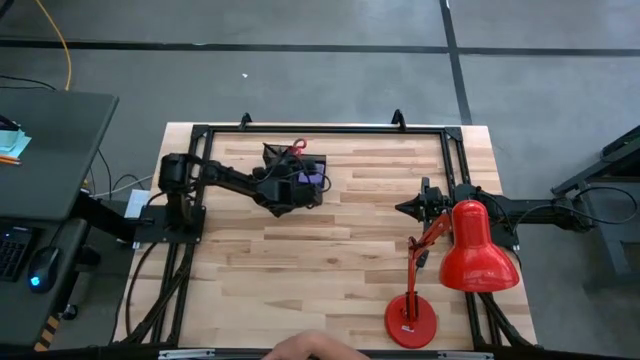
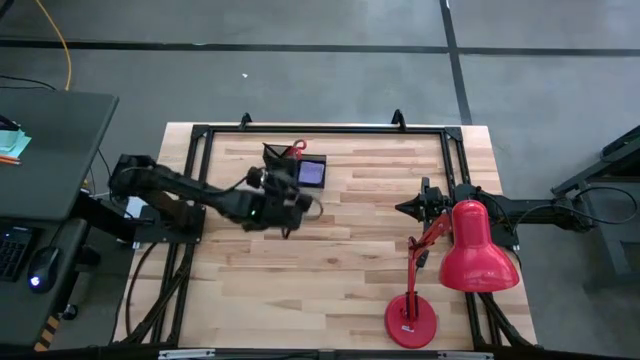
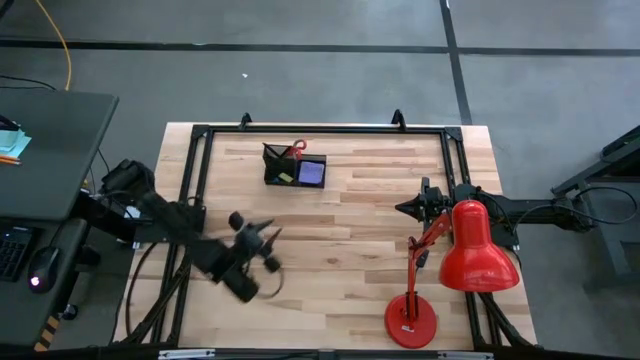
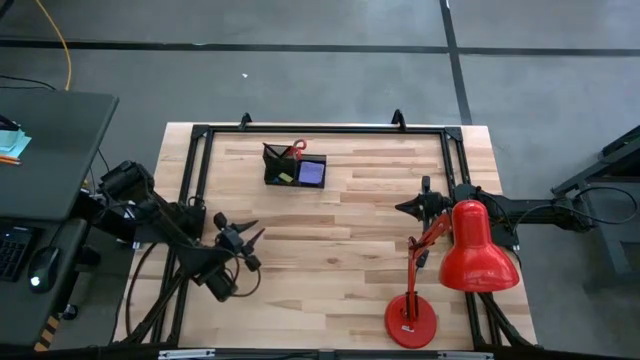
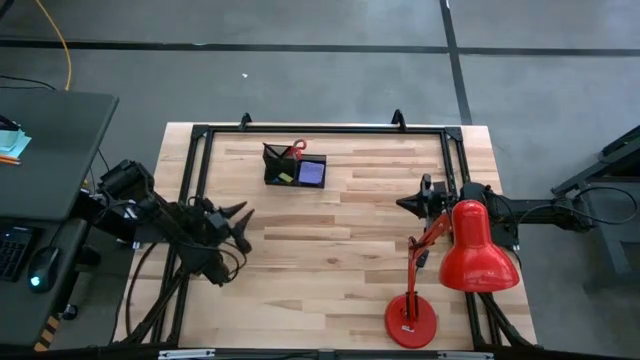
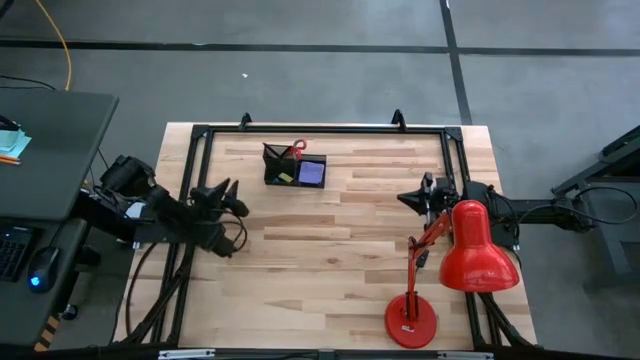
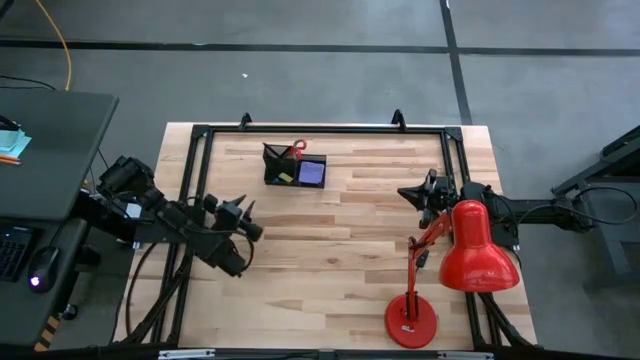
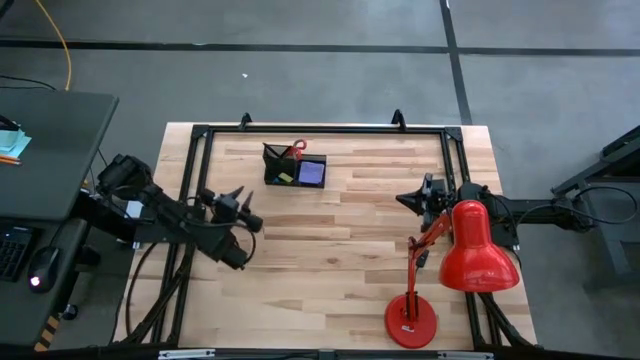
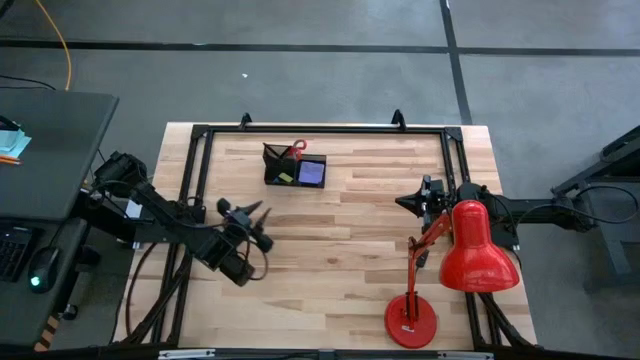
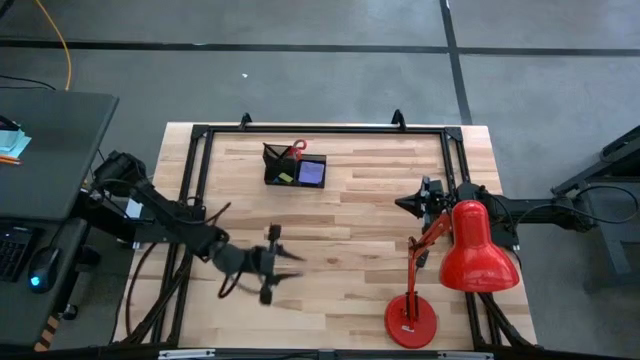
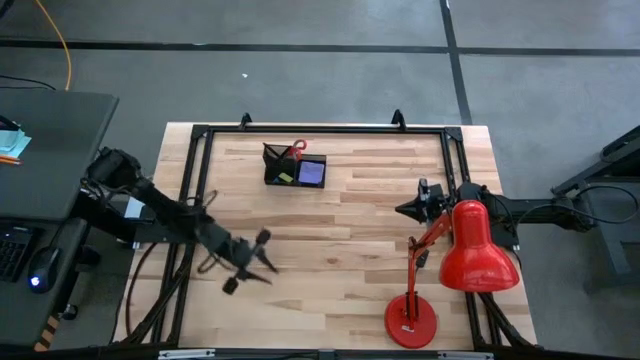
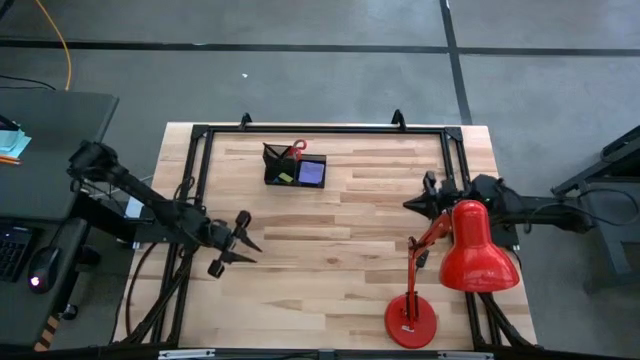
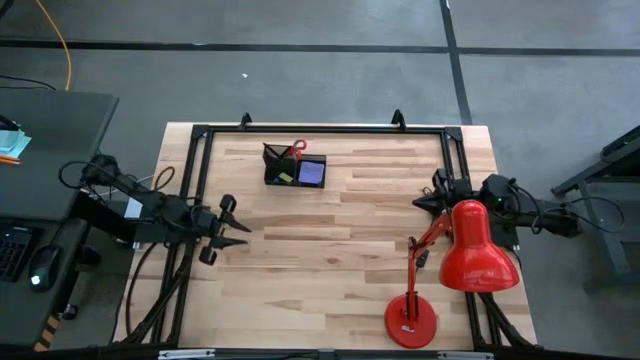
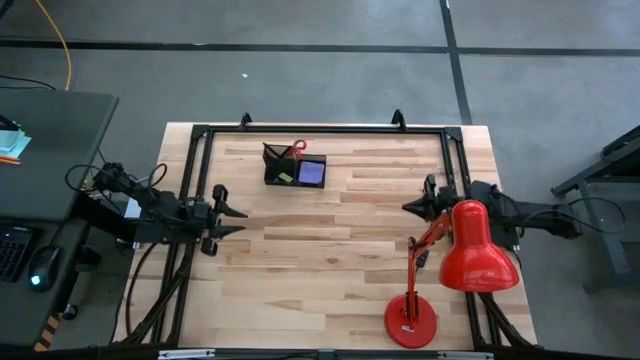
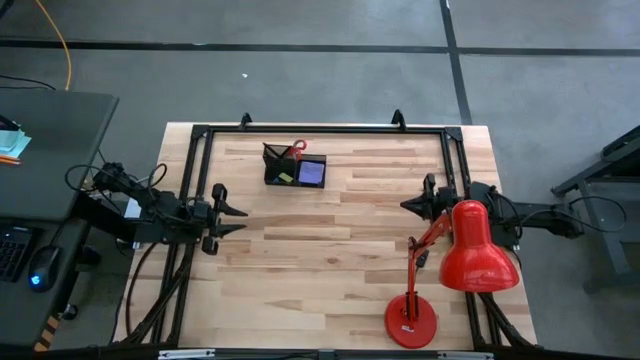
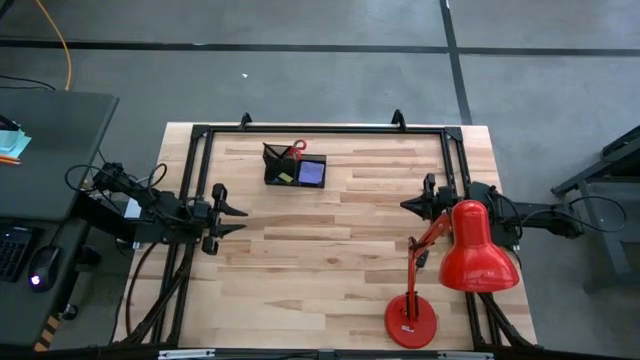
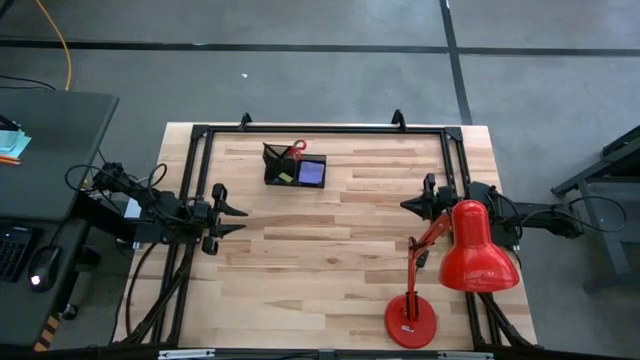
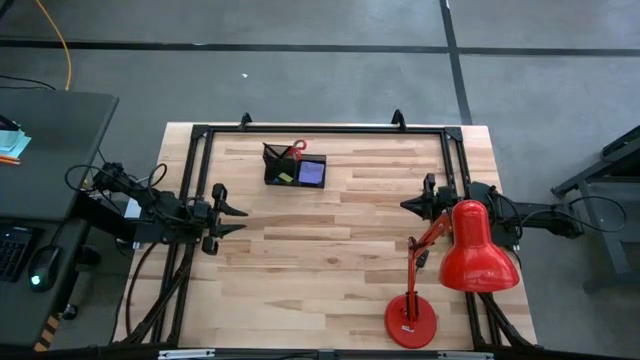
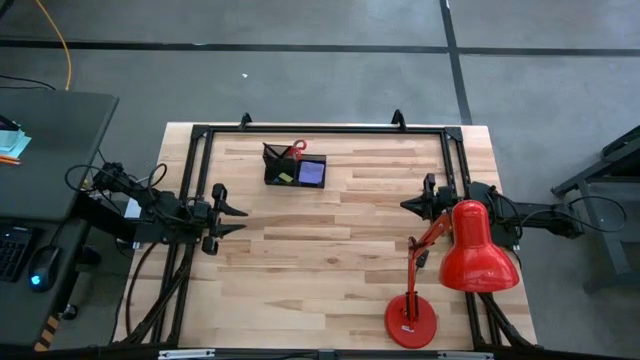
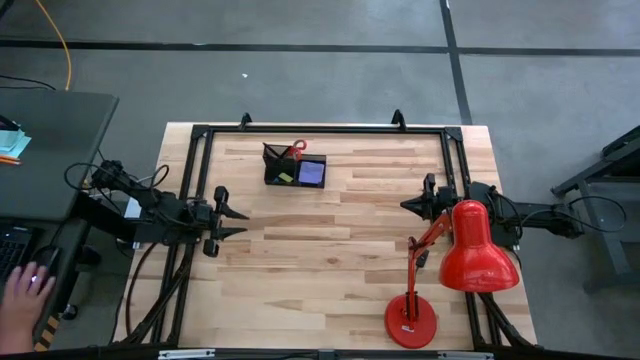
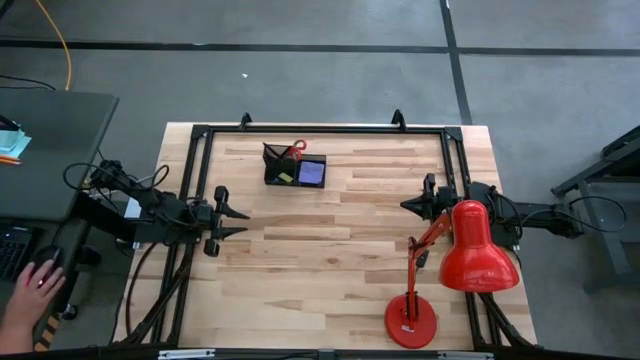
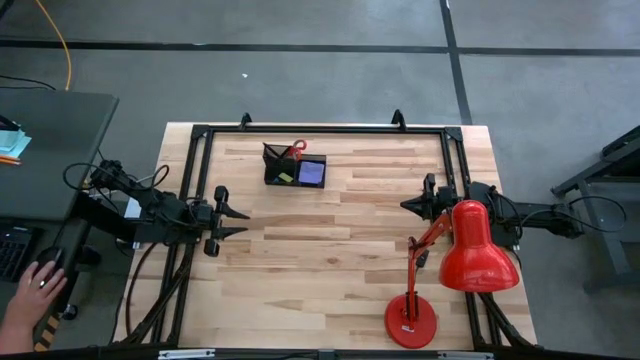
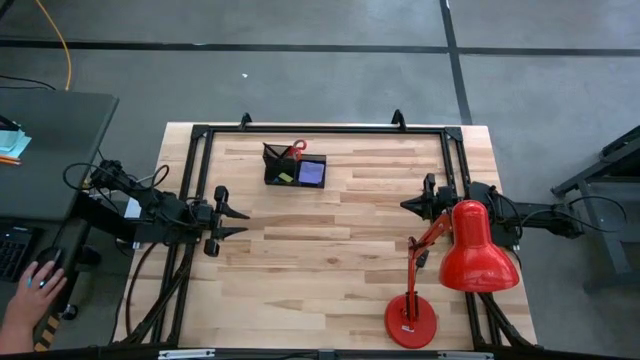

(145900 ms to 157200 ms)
Task: Pick and place office supplies into organizer
Return to Home Position

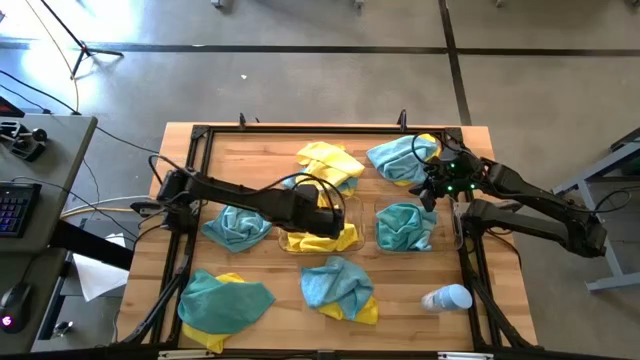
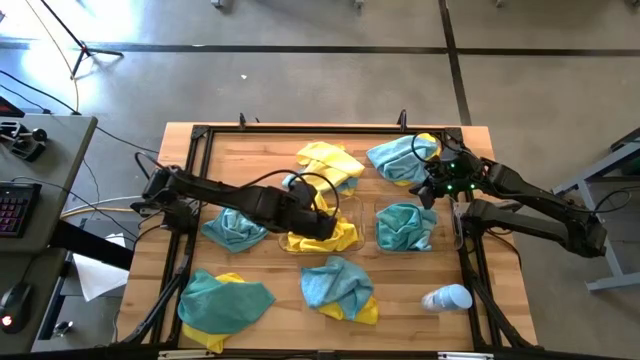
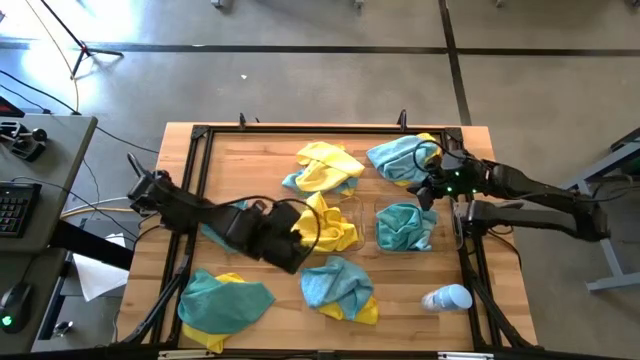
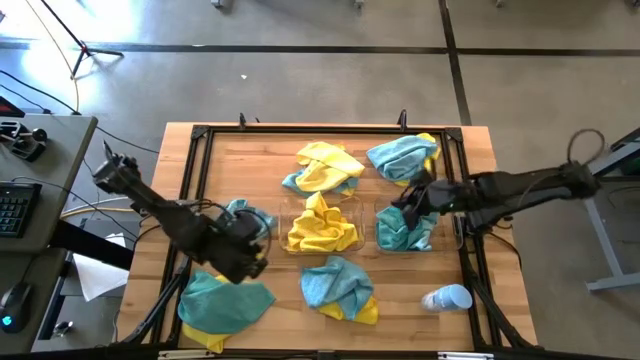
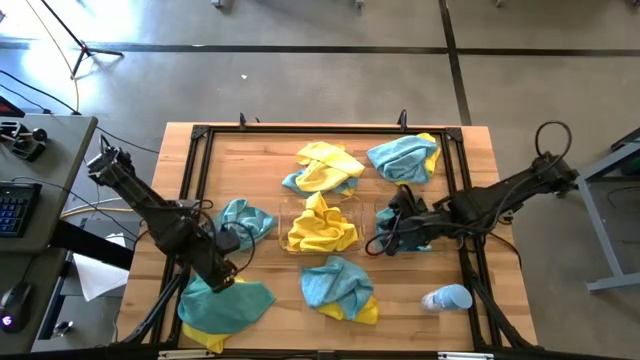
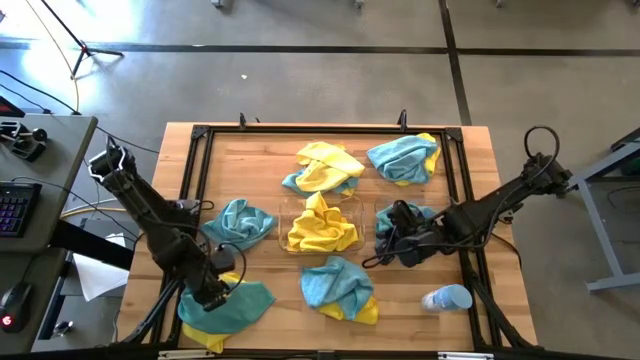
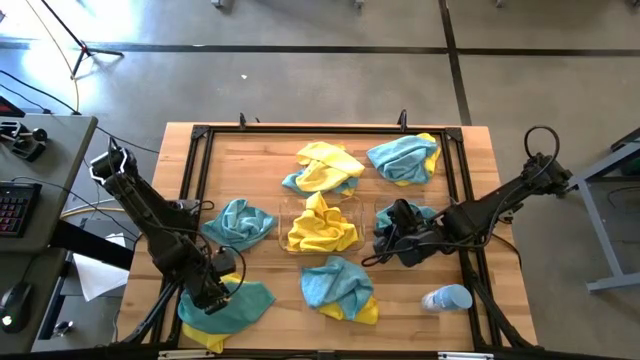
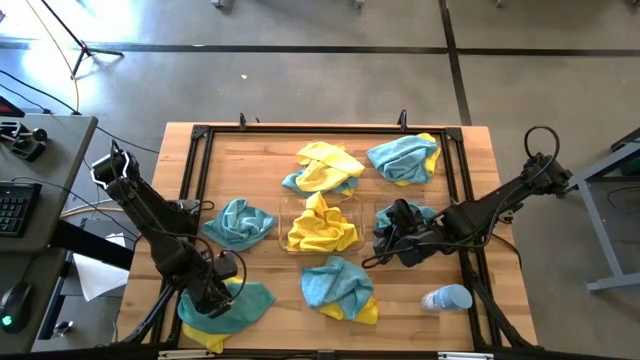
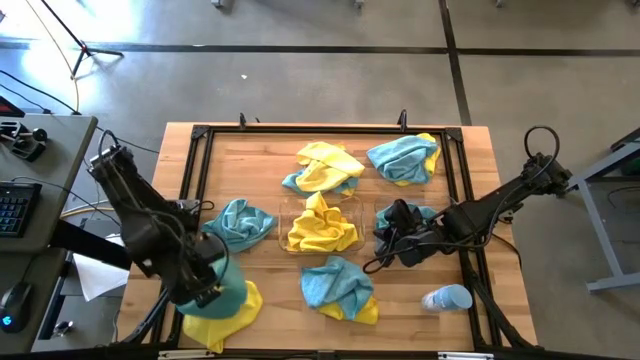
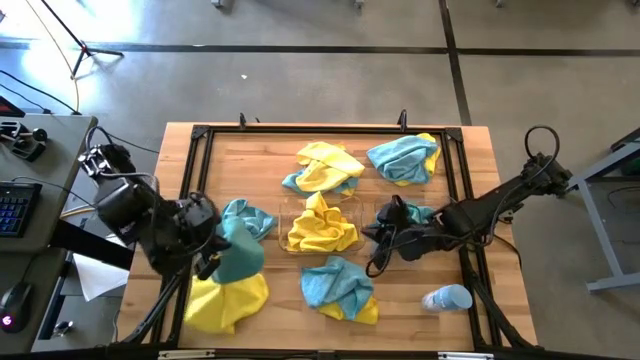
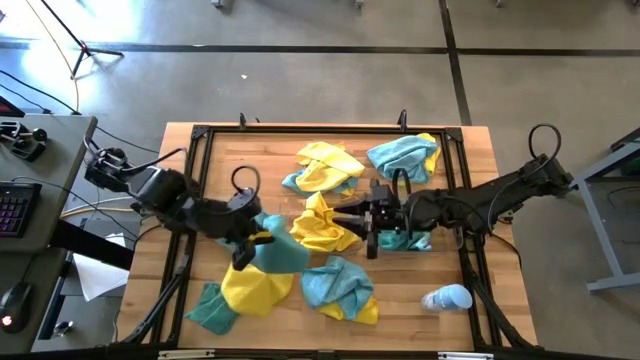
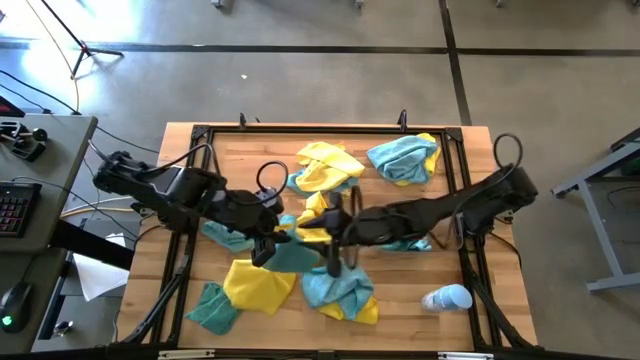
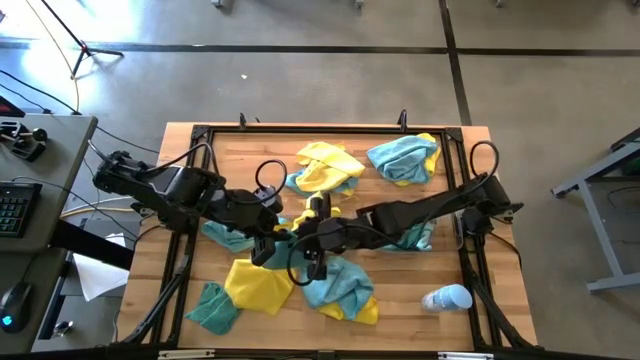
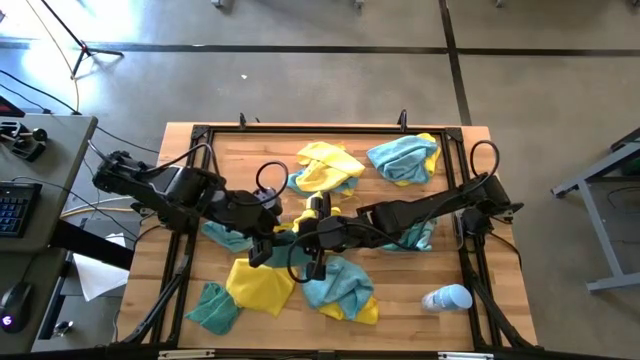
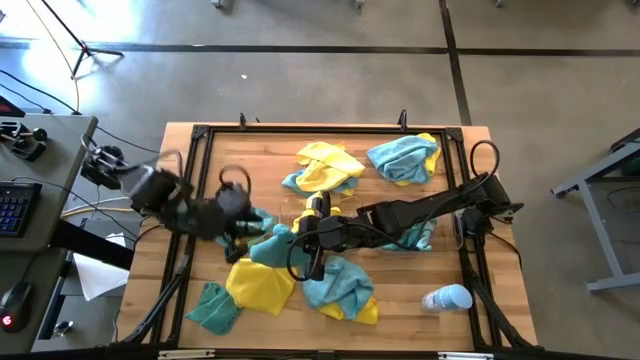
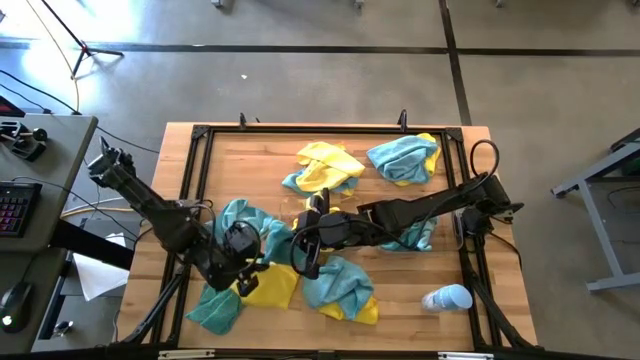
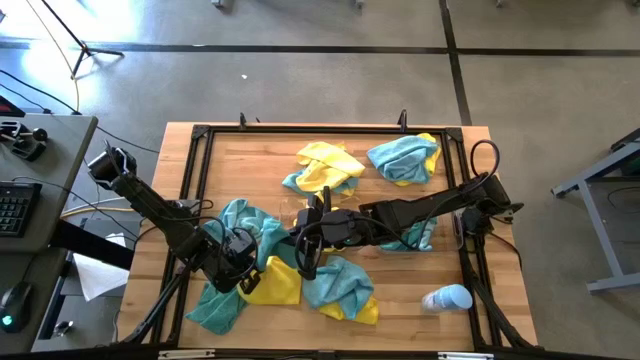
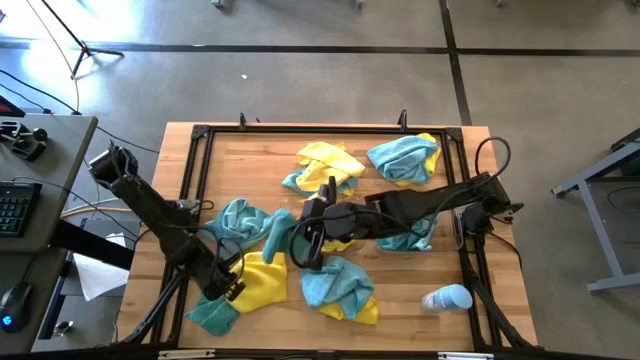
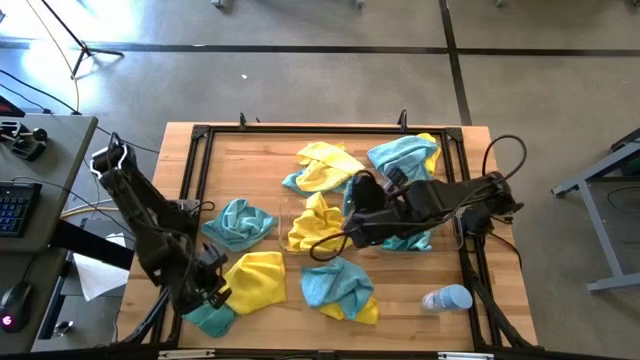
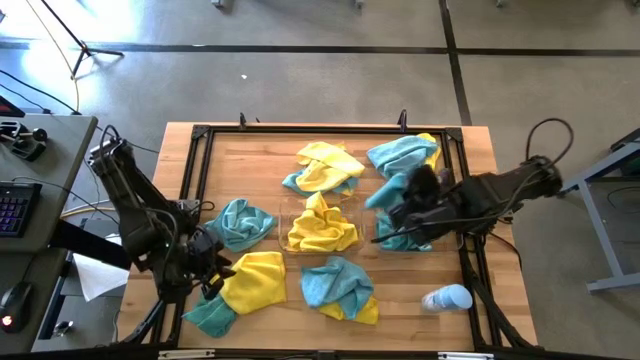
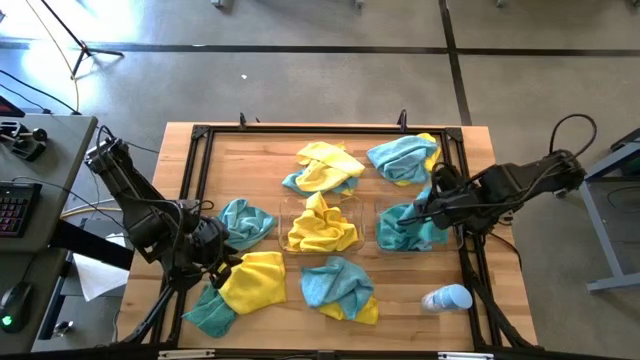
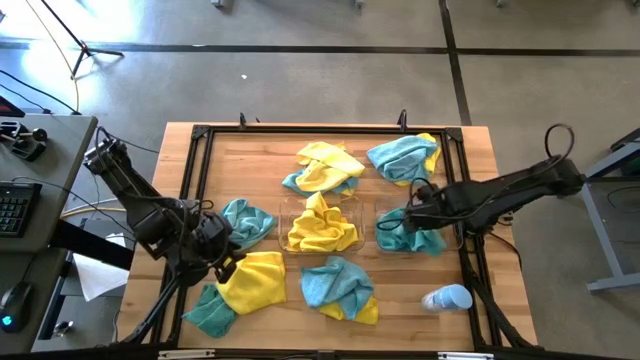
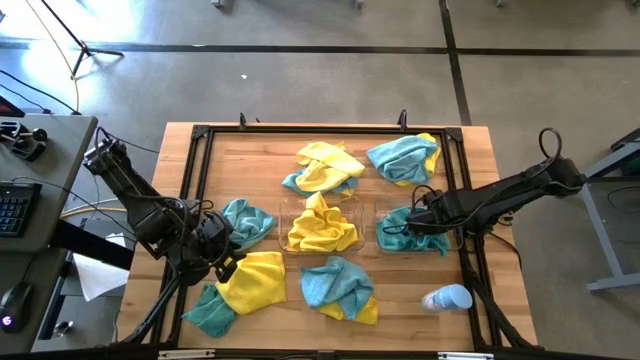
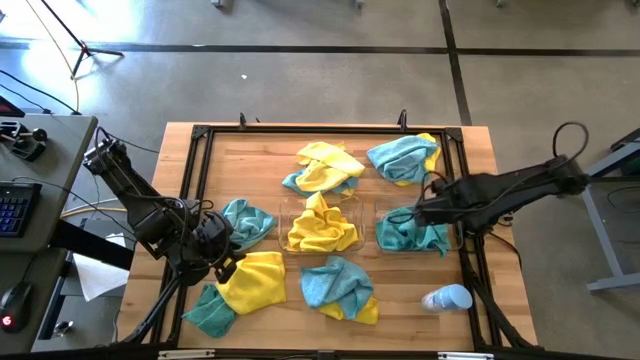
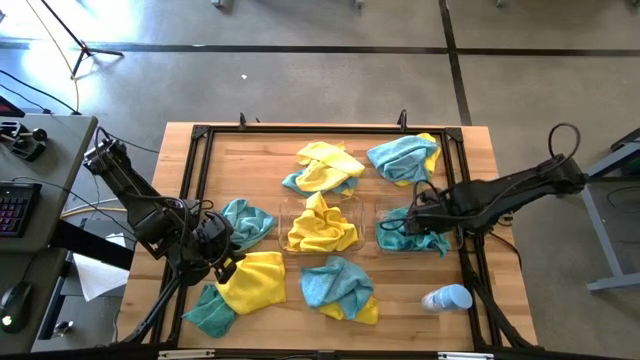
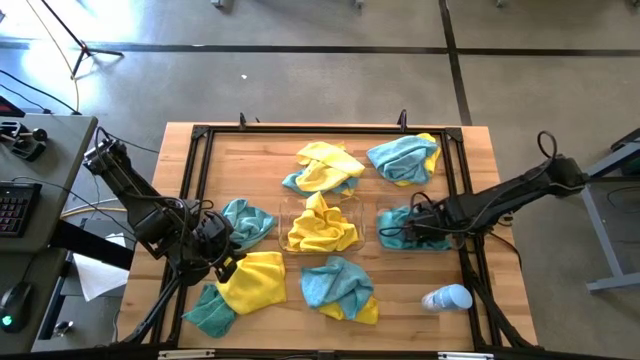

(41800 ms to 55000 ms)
Task: Sort microfiber towel by color & place in baskets
Put the blue microfiber cloth into the right transparent bin
